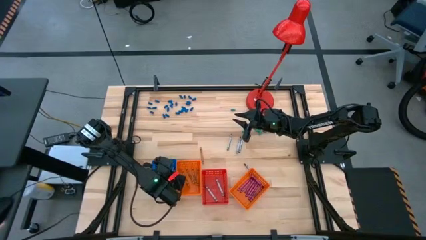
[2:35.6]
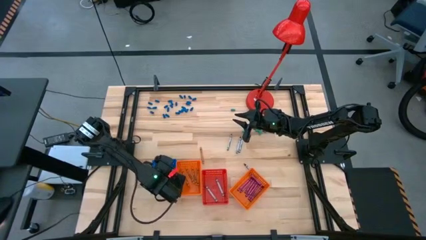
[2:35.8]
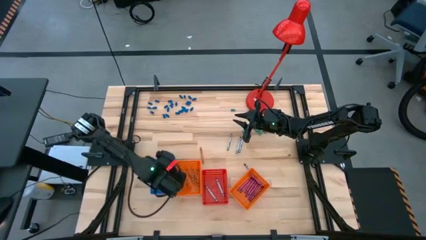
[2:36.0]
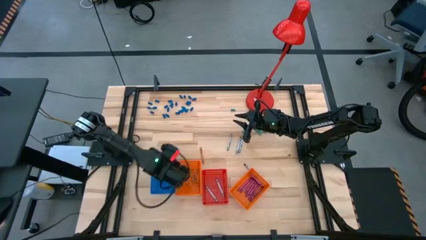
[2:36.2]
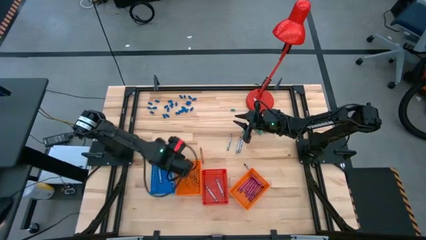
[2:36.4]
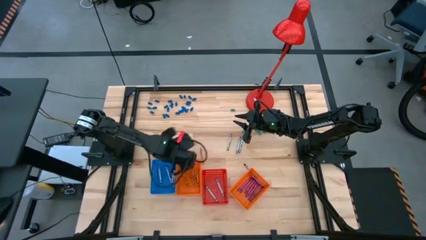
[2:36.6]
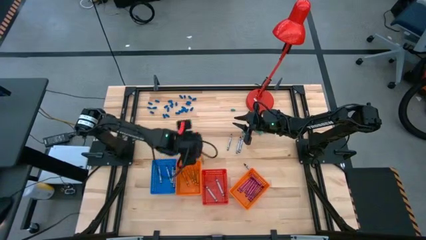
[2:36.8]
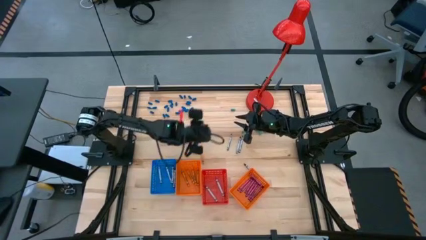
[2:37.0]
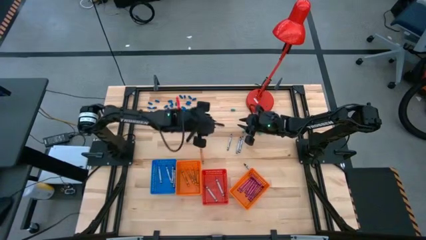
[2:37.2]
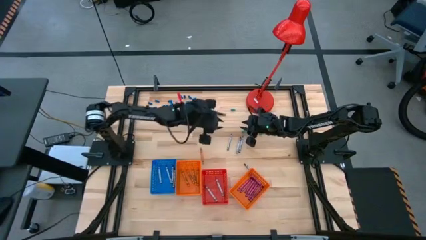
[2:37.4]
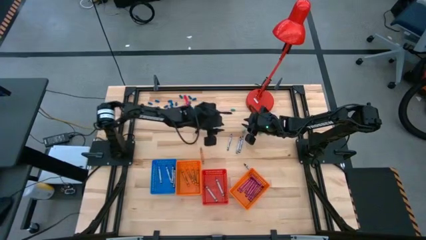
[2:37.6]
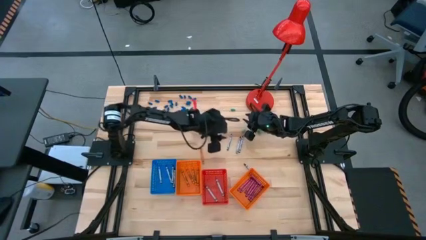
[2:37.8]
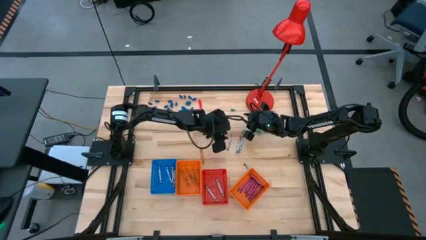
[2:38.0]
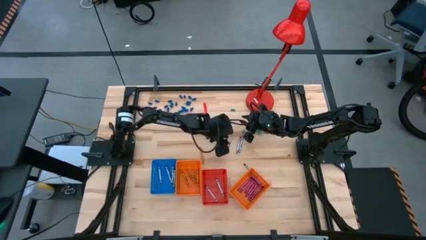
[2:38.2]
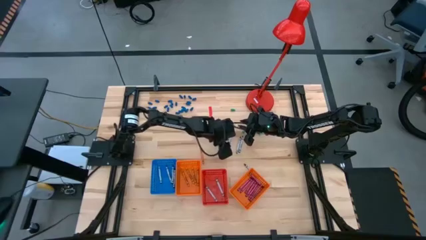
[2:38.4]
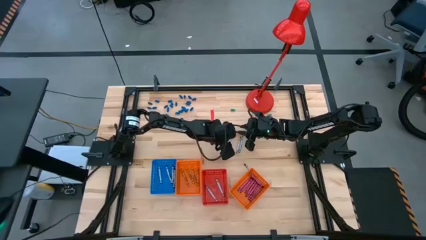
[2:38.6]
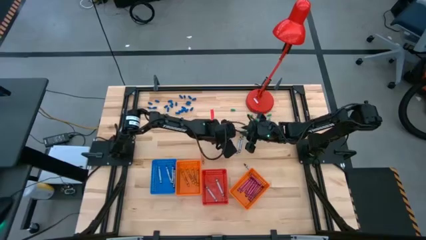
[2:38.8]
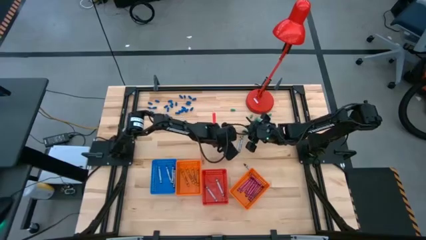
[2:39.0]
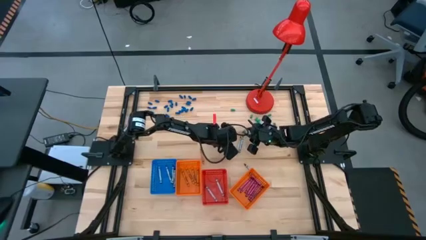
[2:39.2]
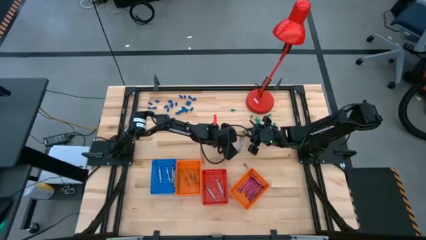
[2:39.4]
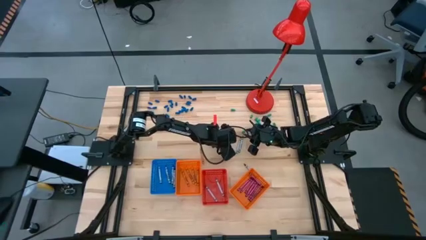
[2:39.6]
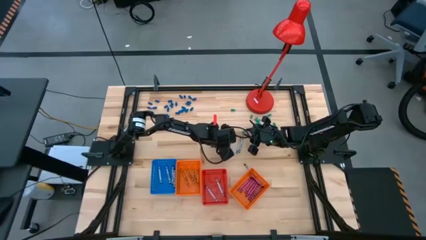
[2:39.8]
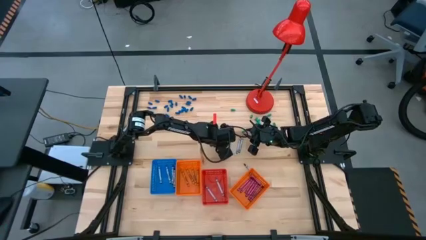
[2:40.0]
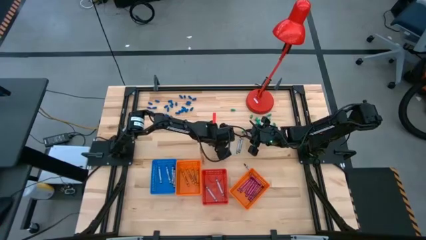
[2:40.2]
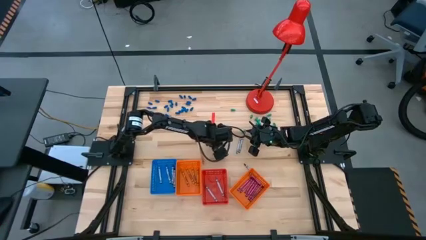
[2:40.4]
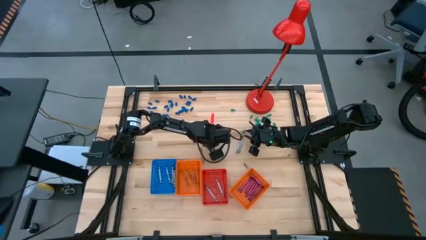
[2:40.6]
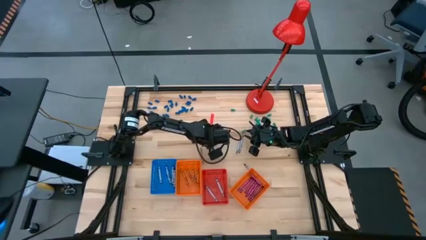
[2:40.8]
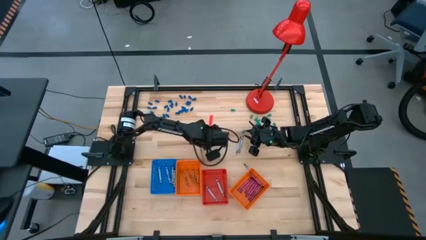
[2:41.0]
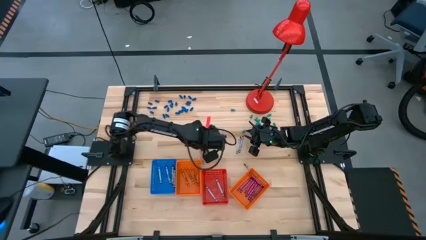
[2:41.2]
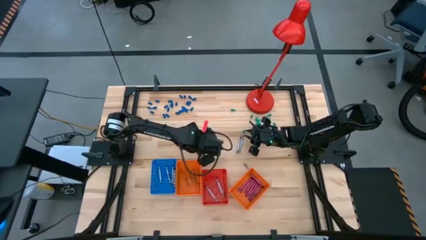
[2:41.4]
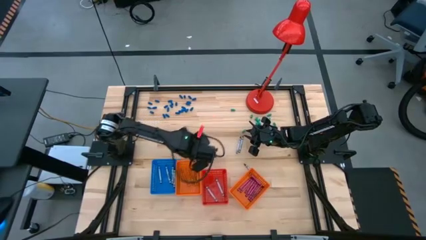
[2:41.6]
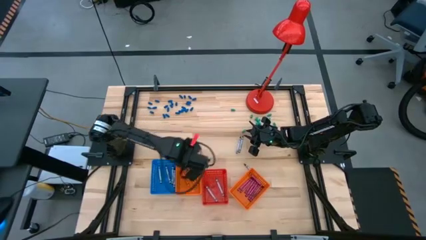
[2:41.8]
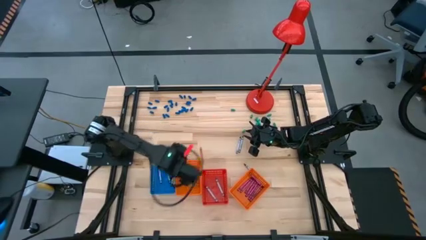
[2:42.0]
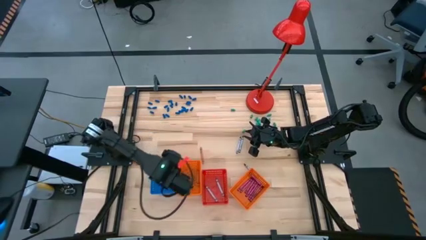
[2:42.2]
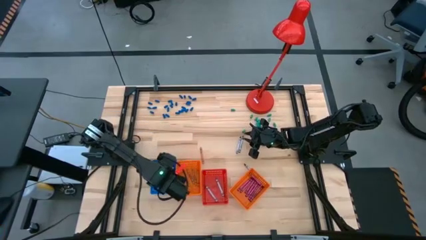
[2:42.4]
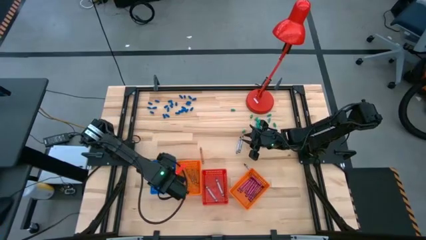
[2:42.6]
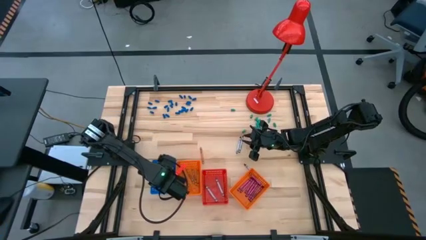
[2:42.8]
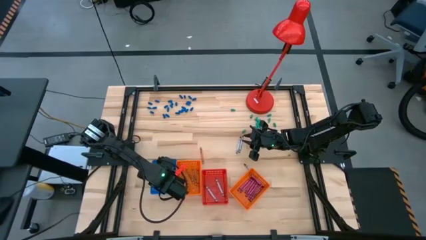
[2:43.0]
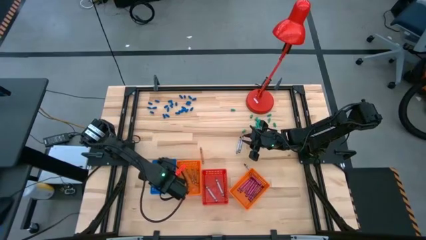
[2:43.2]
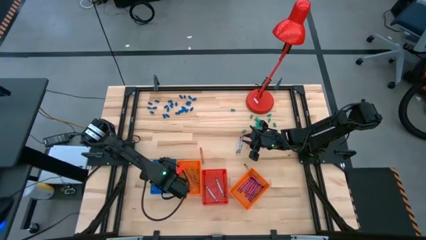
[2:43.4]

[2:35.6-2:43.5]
Task: Sort crayons
Put the black crayon into the blue bin

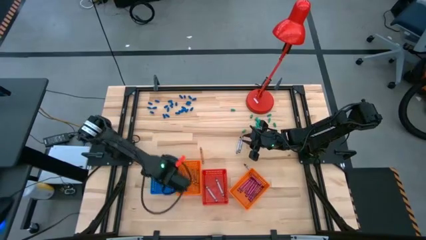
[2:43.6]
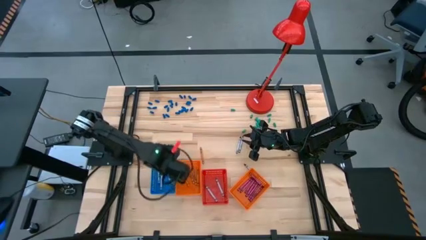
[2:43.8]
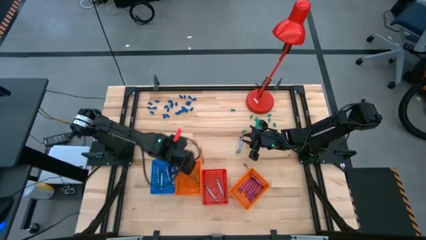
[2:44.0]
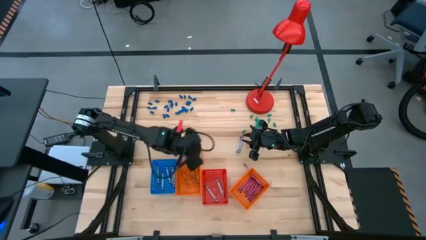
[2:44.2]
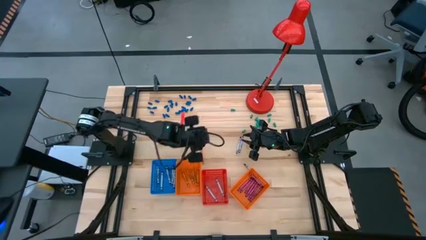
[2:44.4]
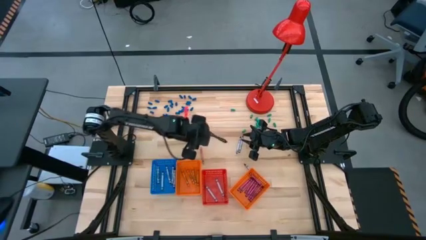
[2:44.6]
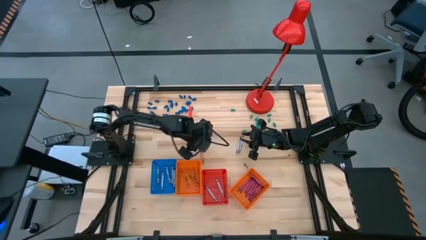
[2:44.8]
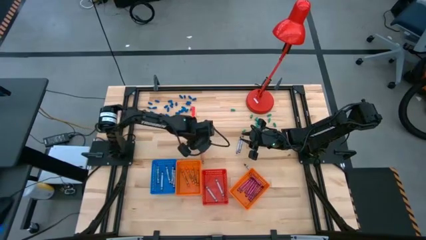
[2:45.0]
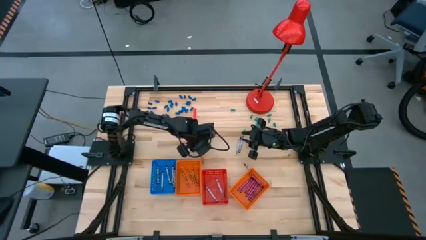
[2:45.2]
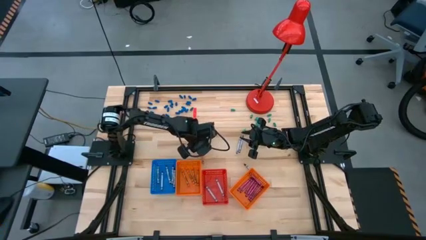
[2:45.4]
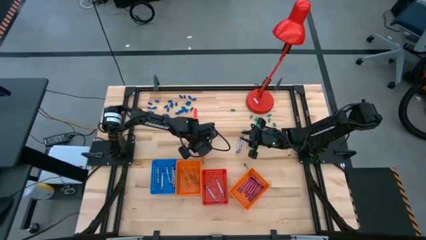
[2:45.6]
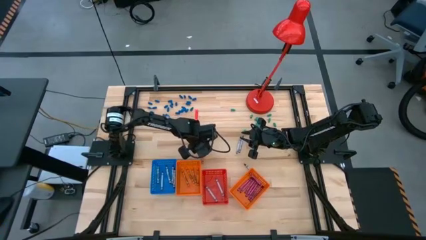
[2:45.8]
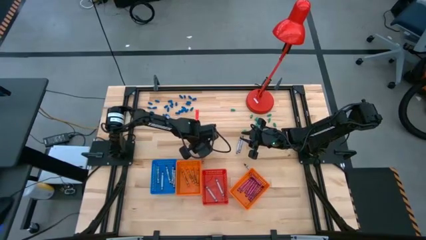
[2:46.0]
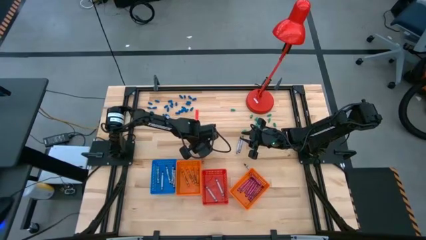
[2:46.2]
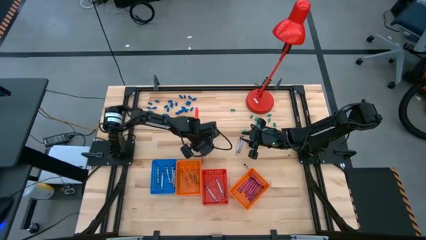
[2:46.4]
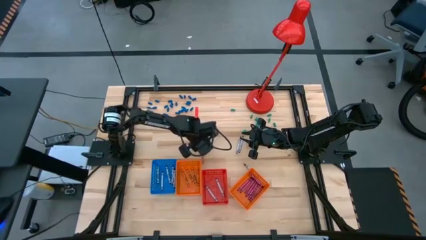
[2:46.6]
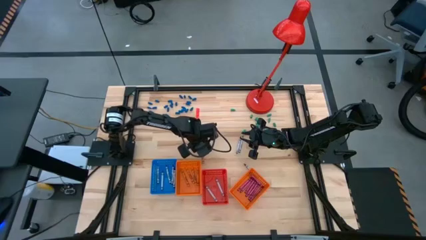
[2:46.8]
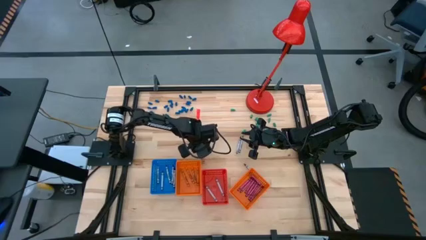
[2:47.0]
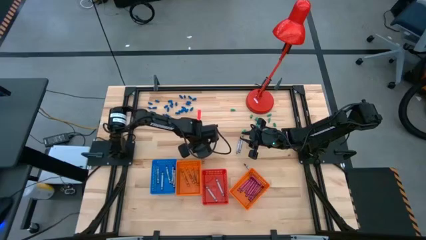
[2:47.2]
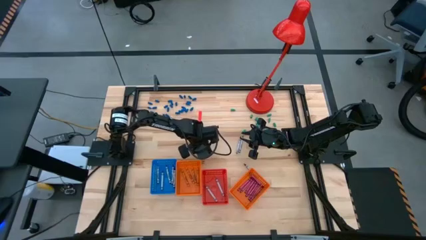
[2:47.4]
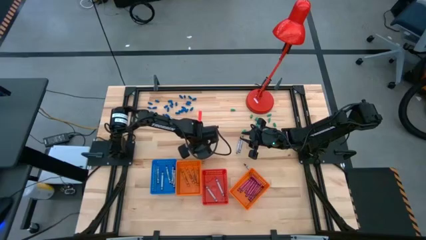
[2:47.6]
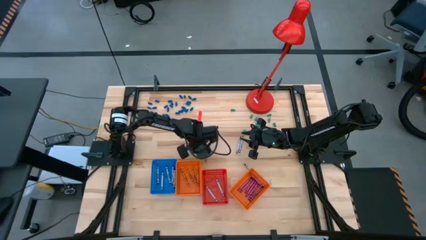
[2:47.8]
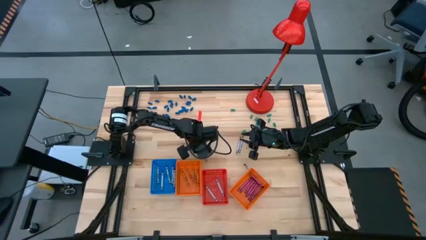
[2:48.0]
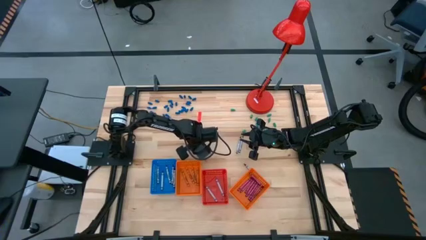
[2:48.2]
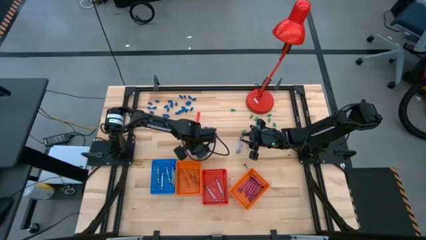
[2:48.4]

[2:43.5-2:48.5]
Put the orange crayon into the left orange bin

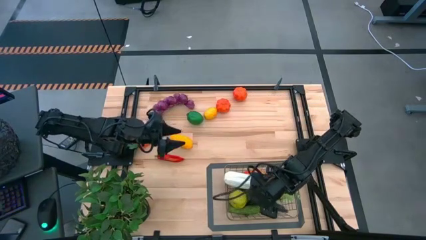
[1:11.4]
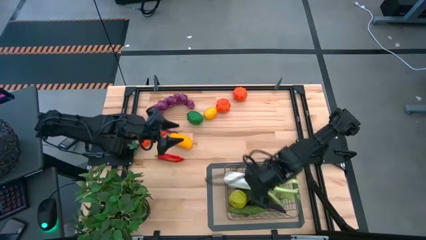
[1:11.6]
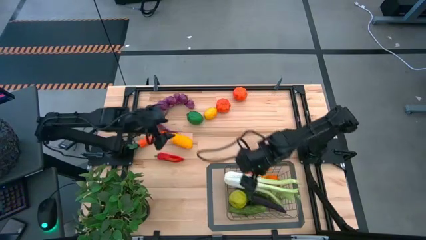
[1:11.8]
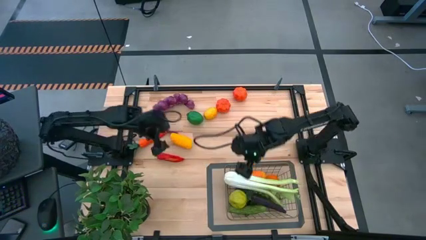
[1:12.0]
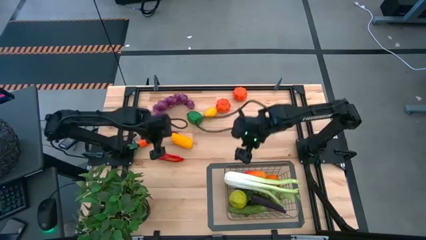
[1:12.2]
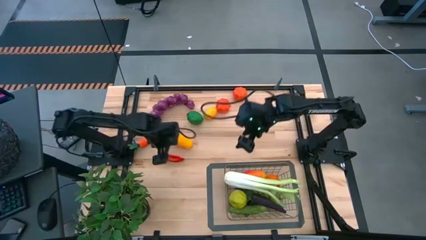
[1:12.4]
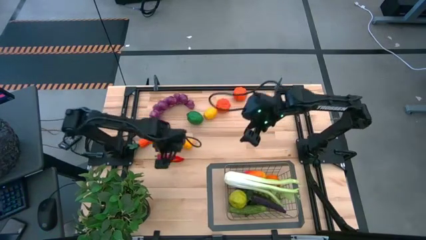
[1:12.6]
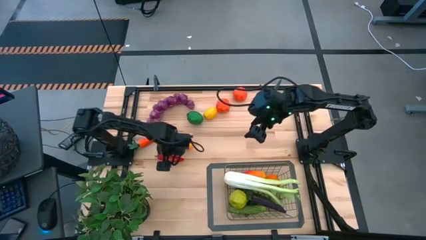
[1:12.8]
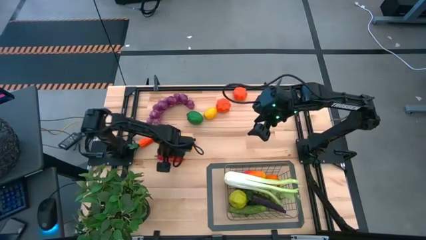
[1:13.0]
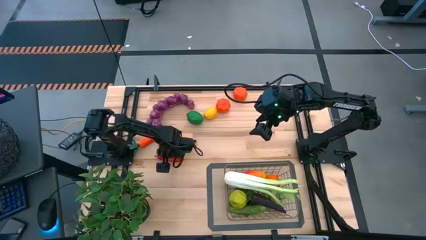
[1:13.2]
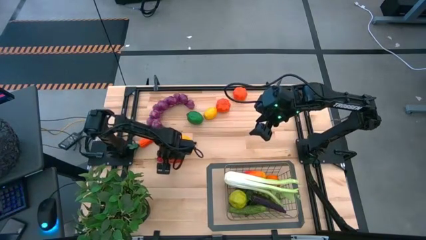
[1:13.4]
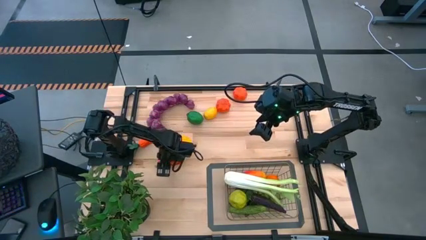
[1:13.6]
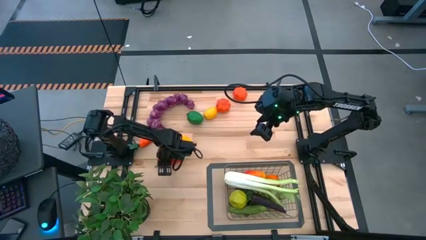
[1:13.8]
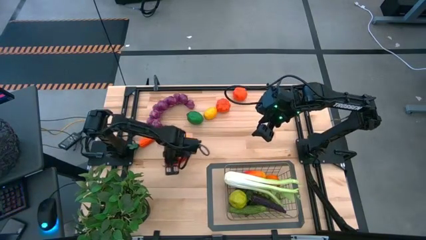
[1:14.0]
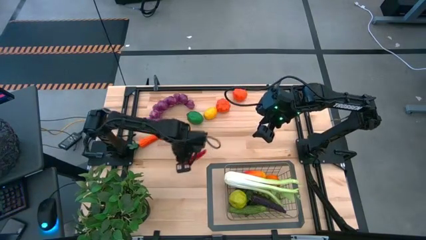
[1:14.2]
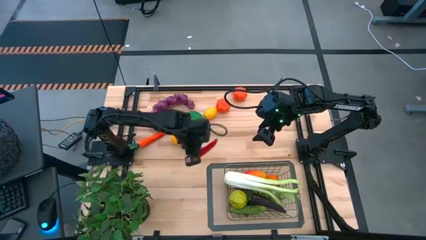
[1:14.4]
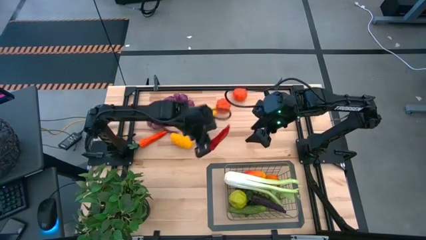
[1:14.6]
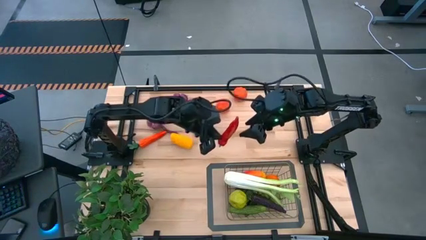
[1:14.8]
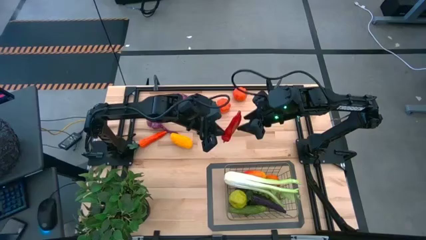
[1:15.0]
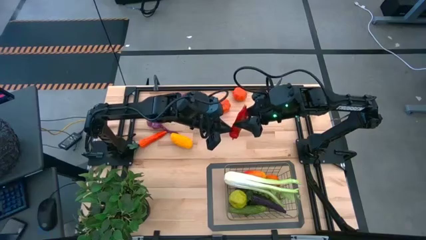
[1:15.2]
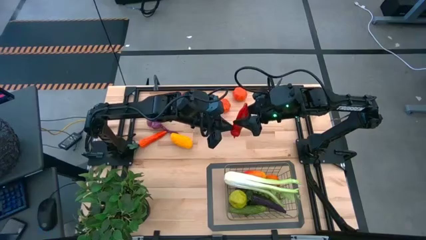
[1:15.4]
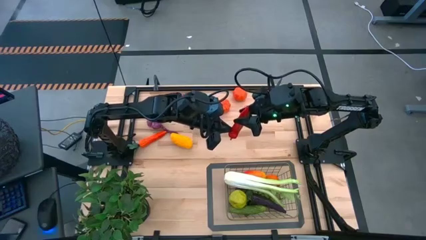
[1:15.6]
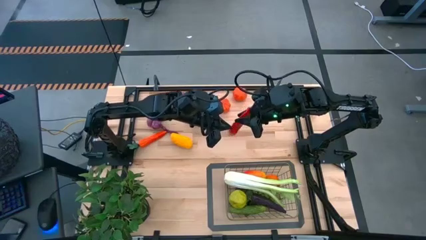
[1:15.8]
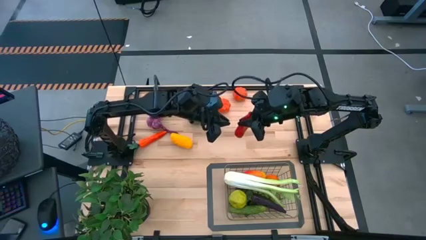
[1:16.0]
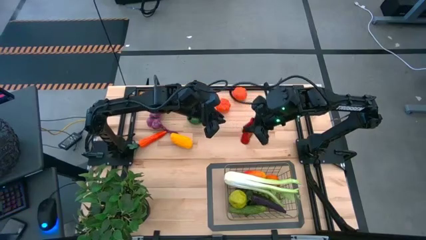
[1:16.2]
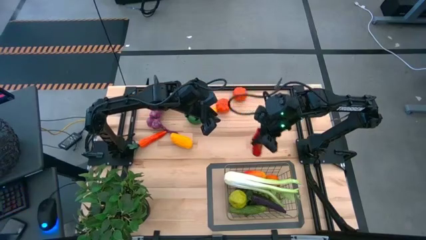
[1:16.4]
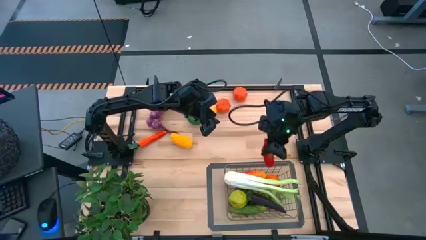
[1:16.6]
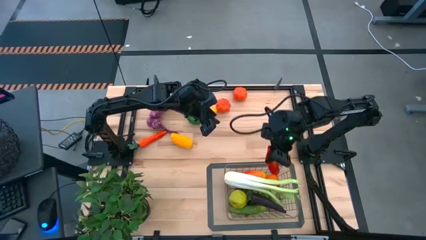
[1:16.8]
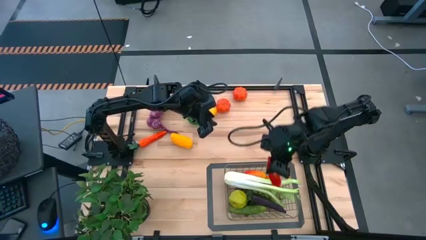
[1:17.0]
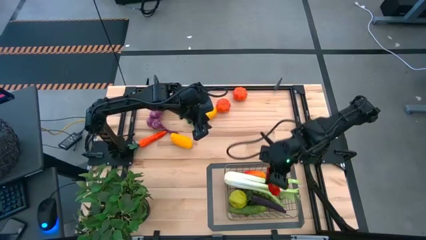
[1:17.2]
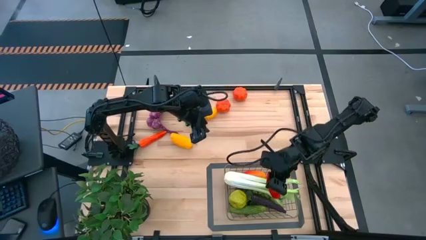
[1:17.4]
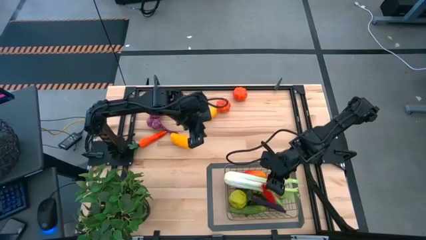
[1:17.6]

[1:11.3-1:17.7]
Task: Build produce basket
Put the red chili pepper into the wire basket
